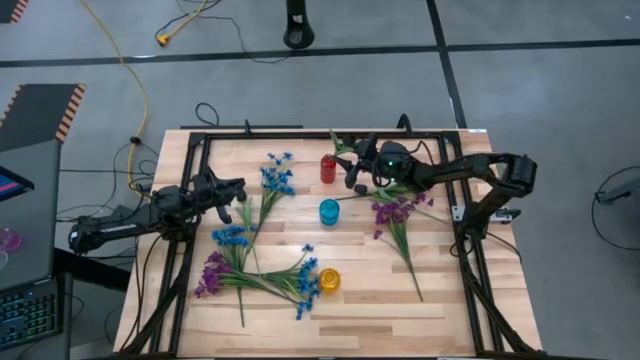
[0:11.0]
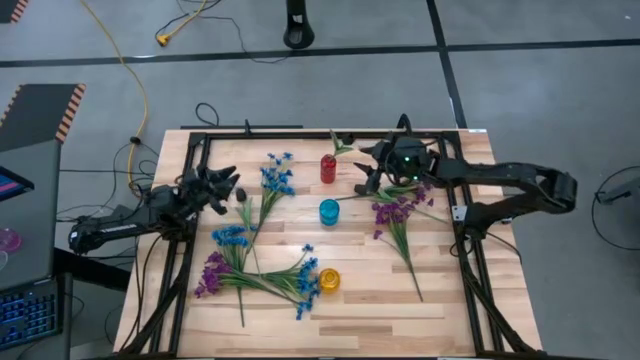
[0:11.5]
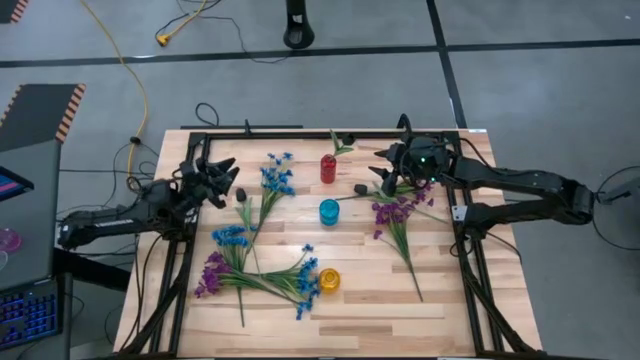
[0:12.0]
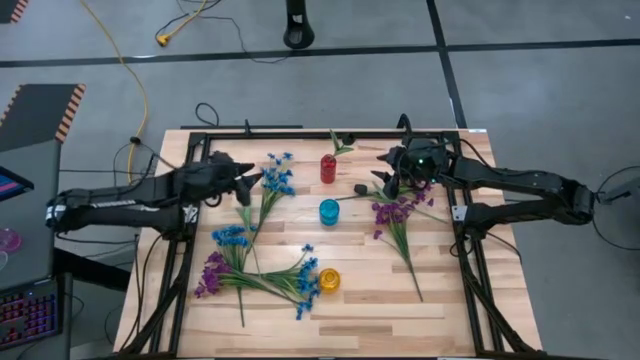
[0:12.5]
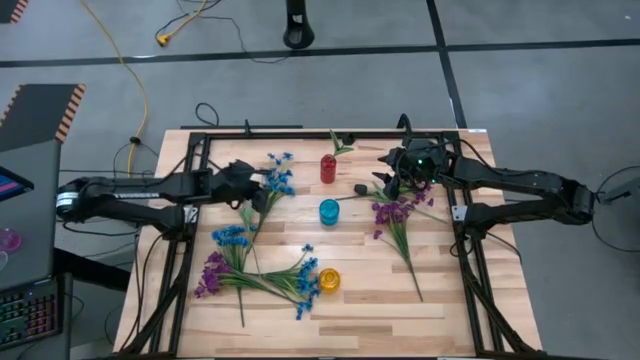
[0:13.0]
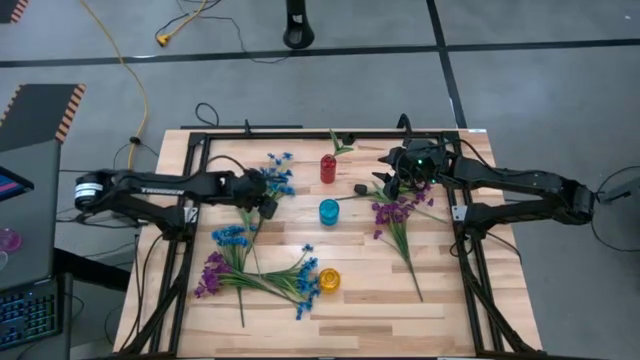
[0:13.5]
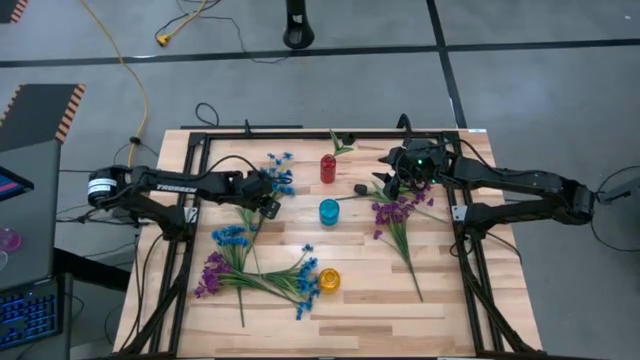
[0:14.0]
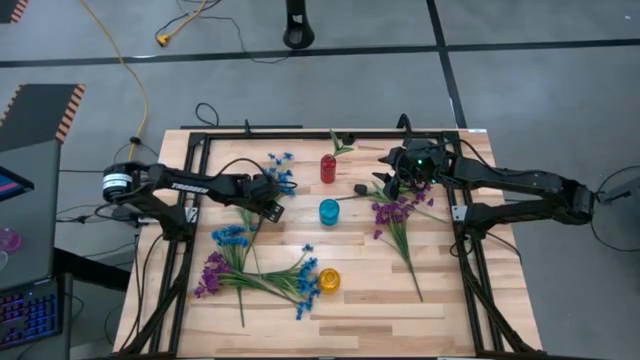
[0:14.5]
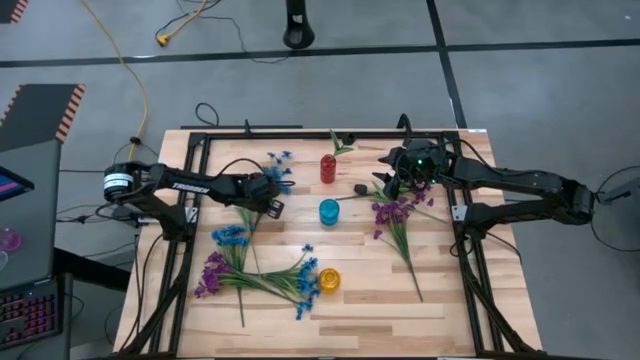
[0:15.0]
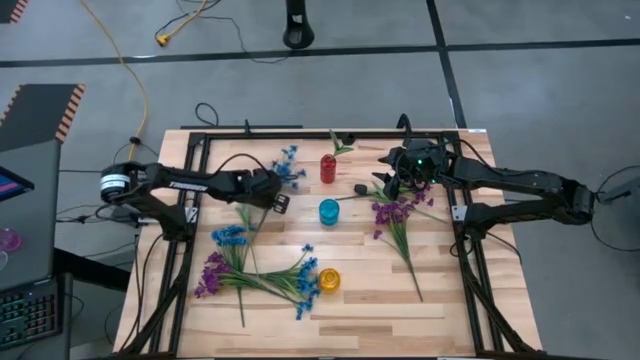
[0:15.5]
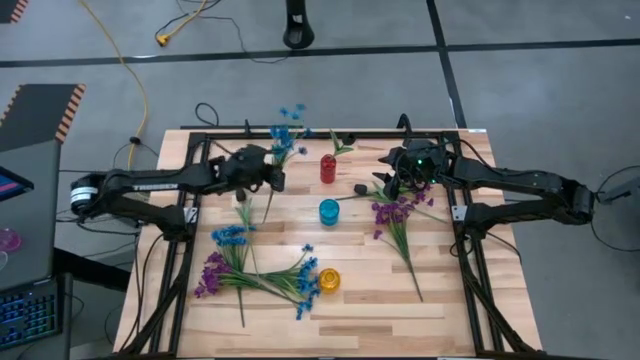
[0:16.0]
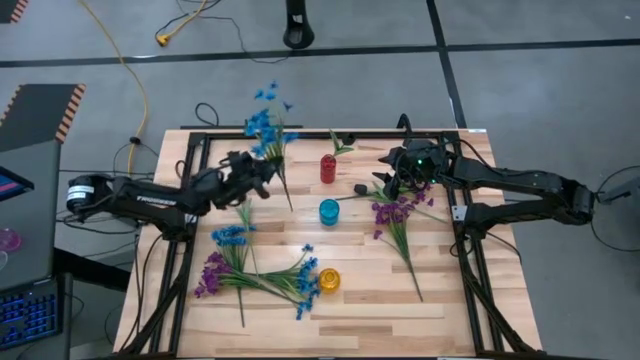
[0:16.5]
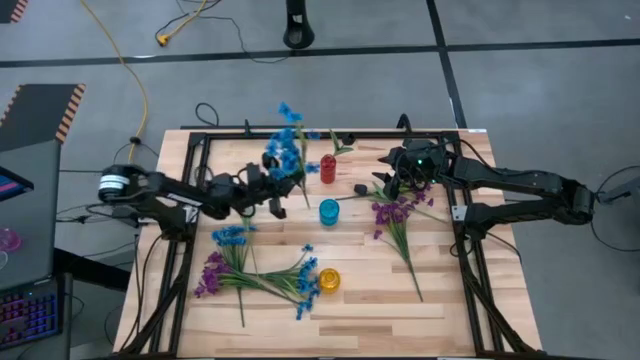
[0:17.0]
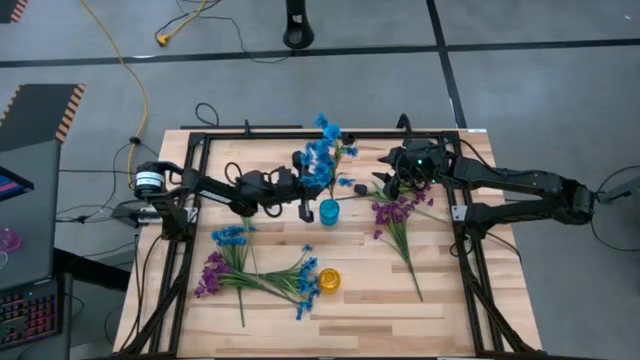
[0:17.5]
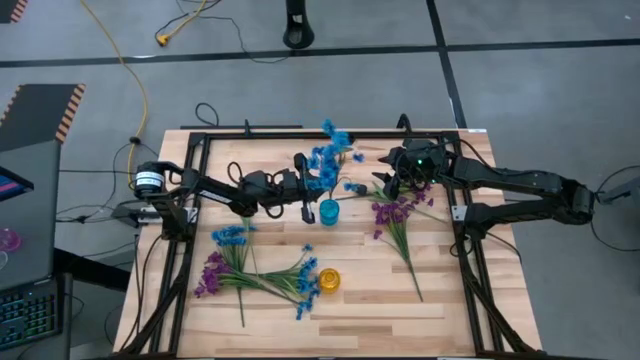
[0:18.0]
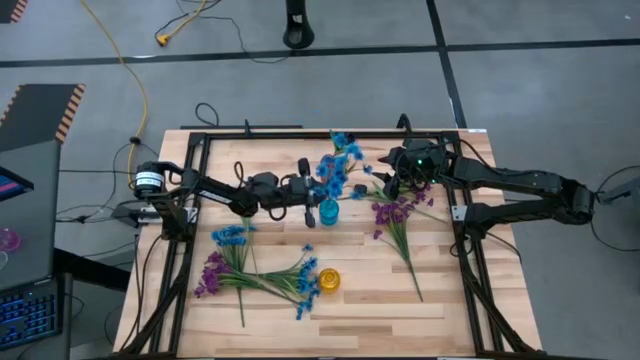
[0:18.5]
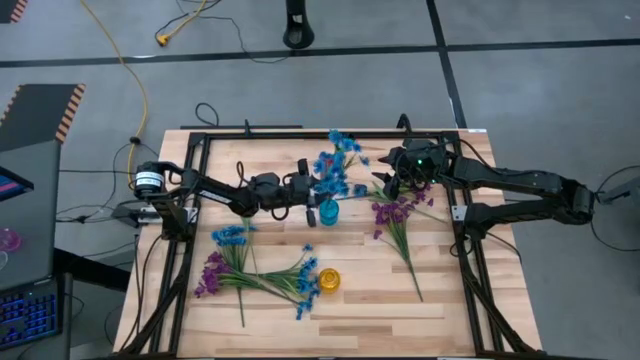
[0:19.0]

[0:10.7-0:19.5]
Task: Sort flowers into vase by color
Put the top middle blue flower into the blue crystal vase

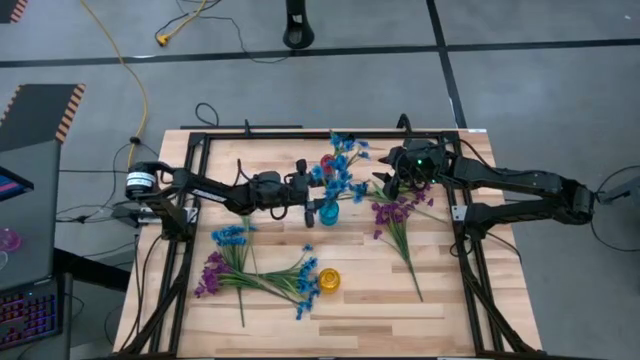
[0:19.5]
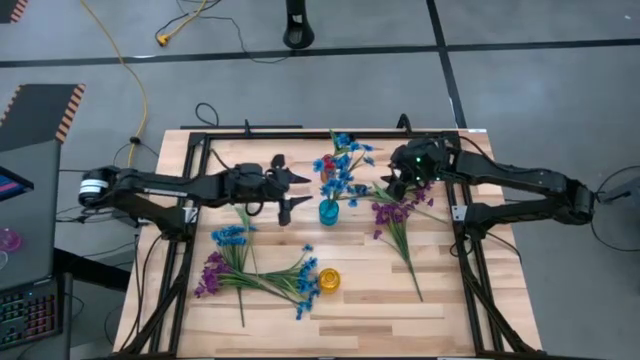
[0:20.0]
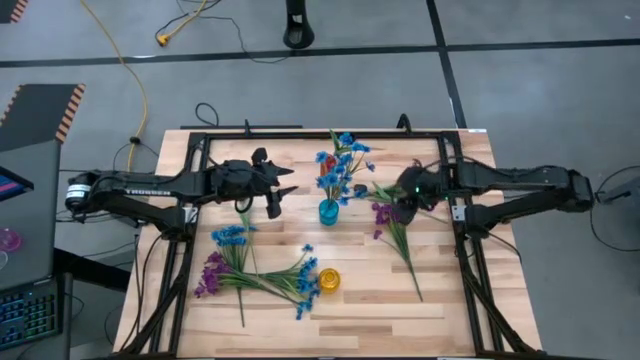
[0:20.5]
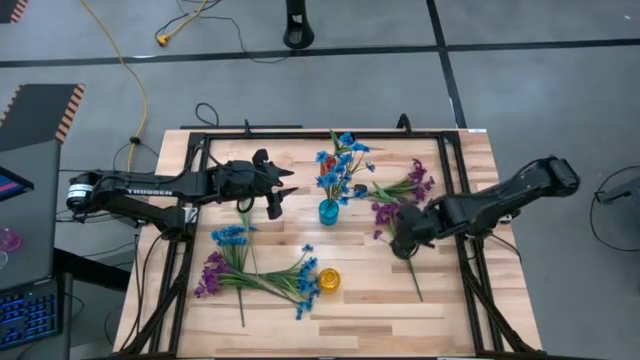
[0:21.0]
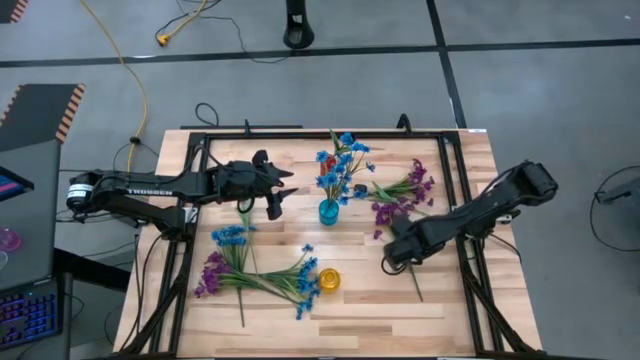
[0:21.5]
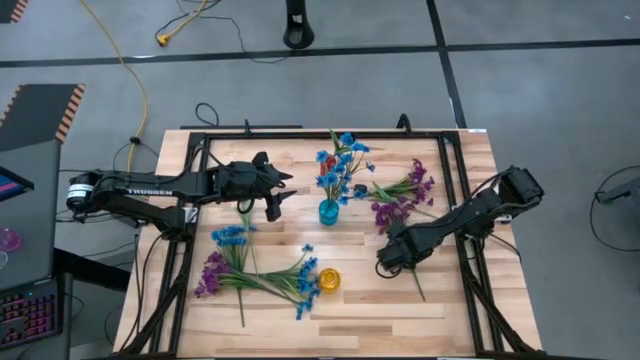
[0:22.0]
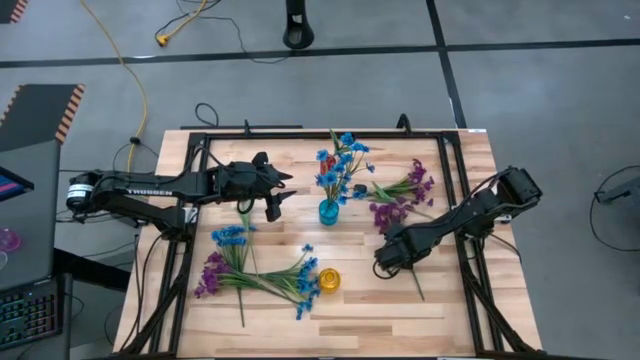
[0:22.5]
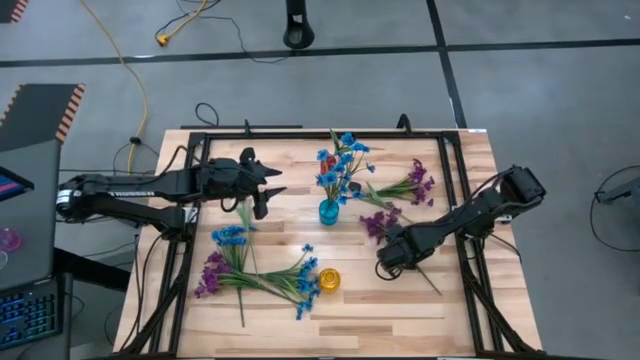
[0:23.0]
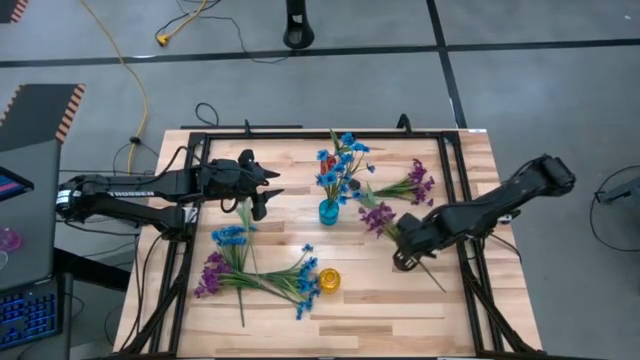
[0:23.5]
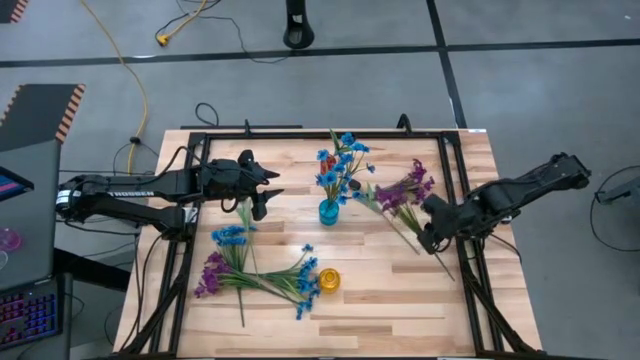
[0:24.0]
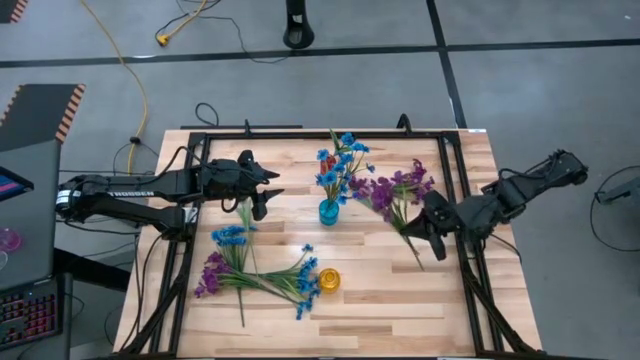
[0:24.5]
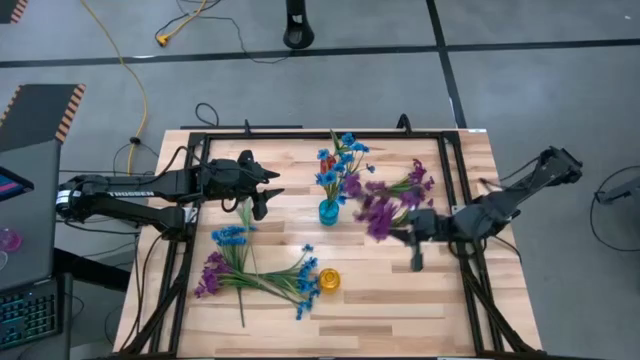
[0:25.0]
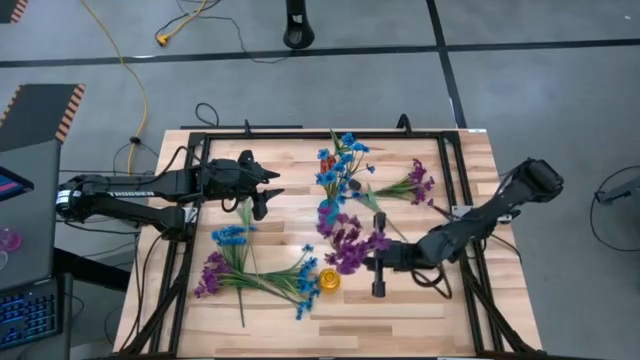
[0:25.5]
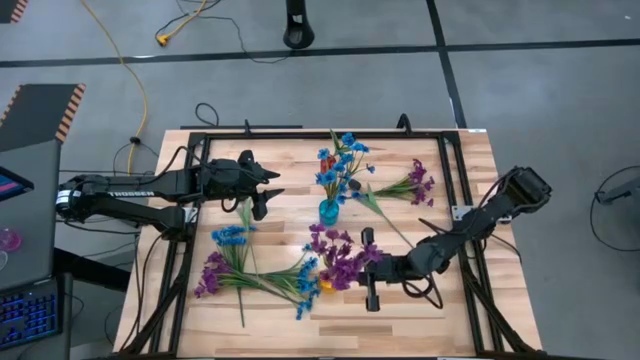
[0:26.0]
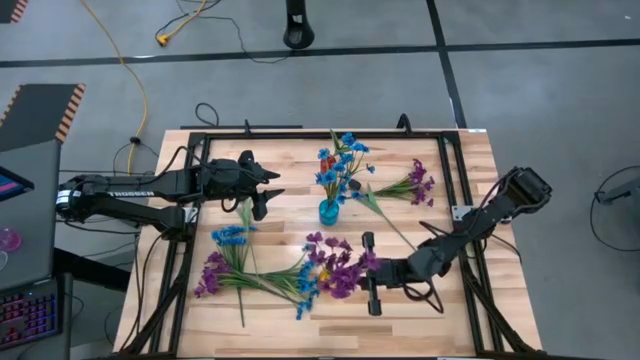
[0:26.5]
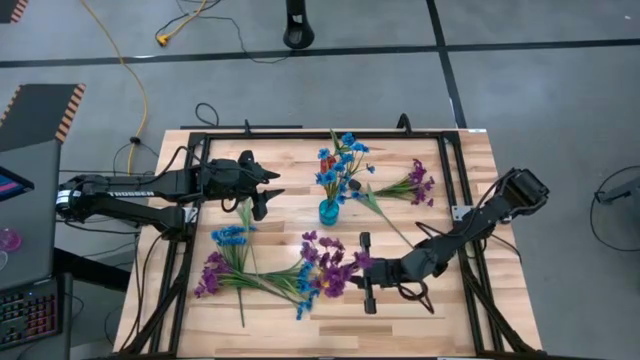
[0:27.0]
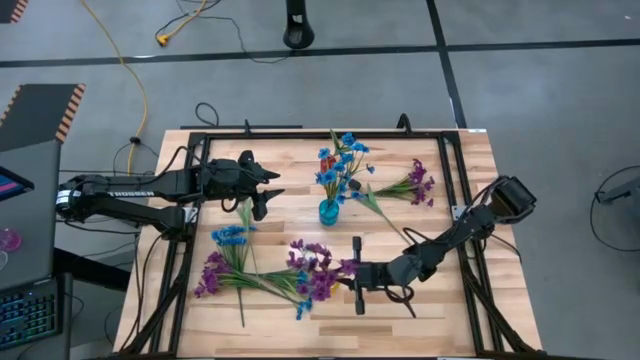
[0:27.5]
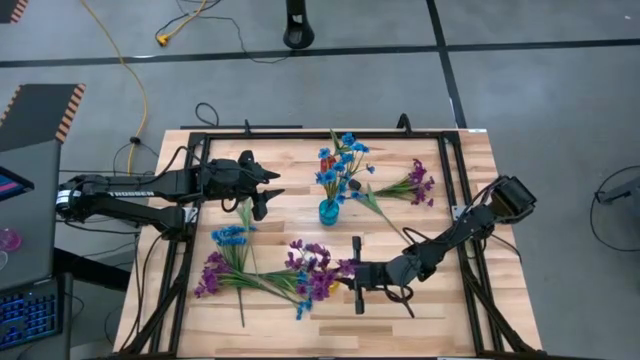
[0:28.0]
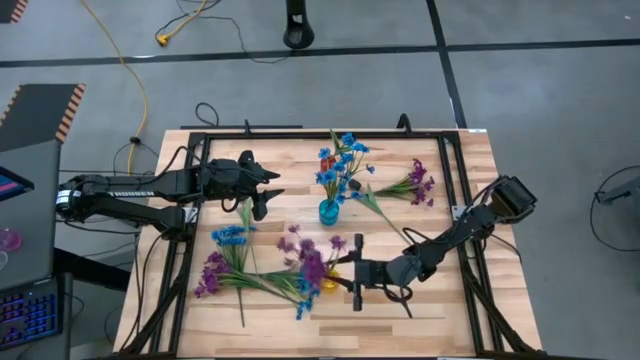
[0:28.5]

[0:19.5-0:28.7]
Put the middle right violet flower into the yellow crystal vase

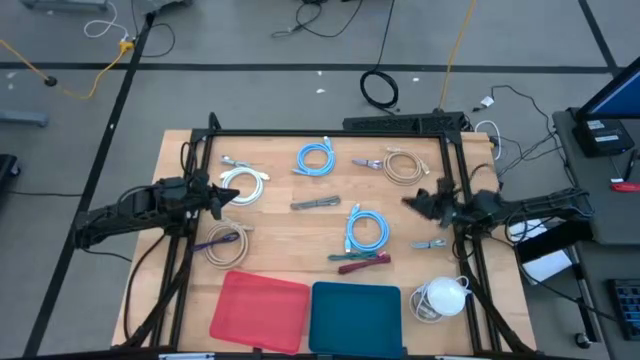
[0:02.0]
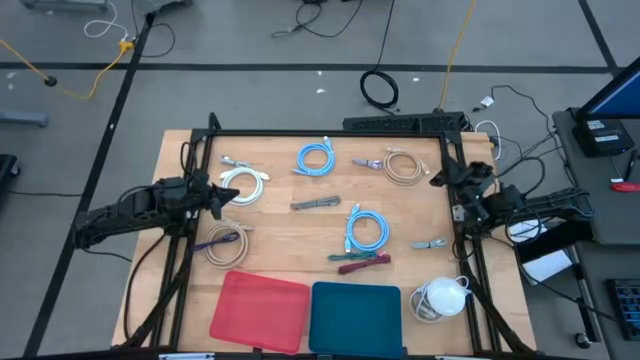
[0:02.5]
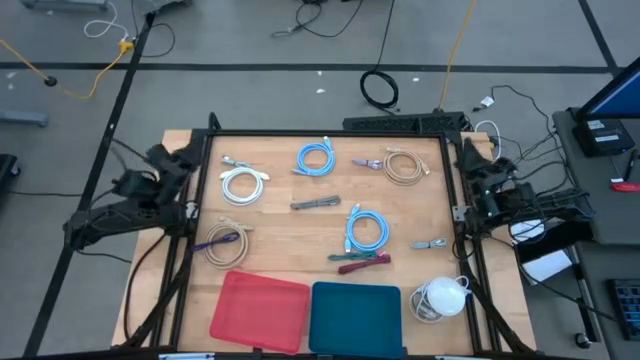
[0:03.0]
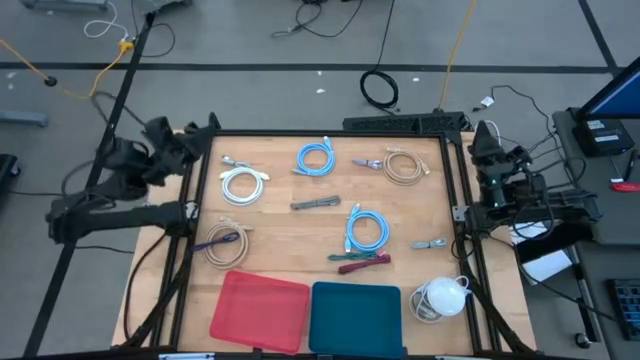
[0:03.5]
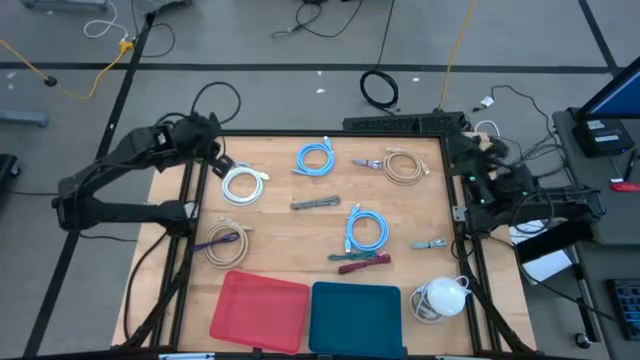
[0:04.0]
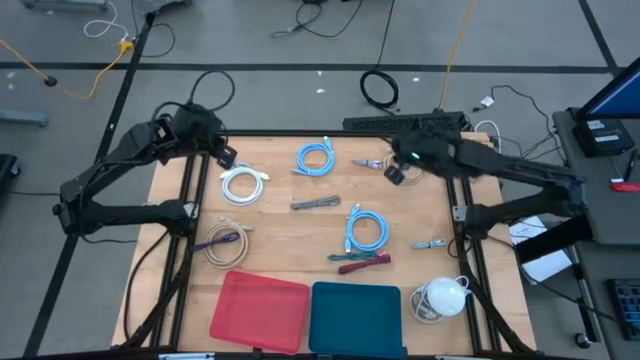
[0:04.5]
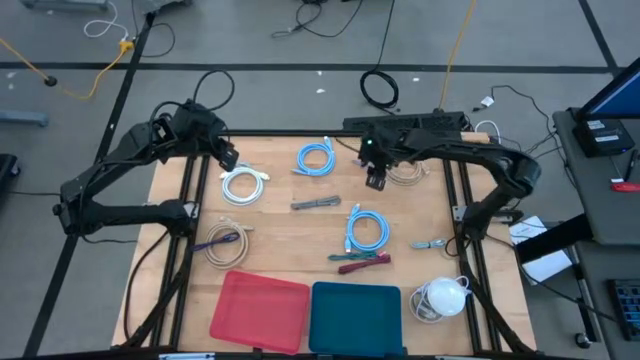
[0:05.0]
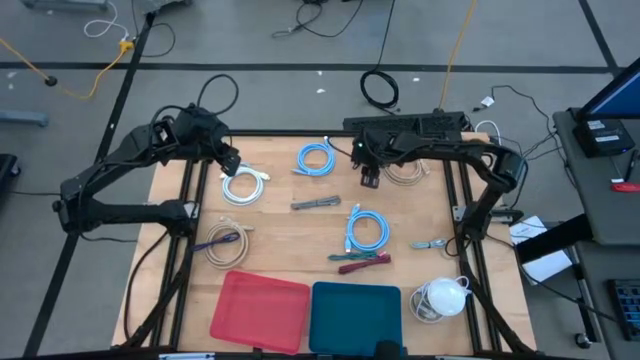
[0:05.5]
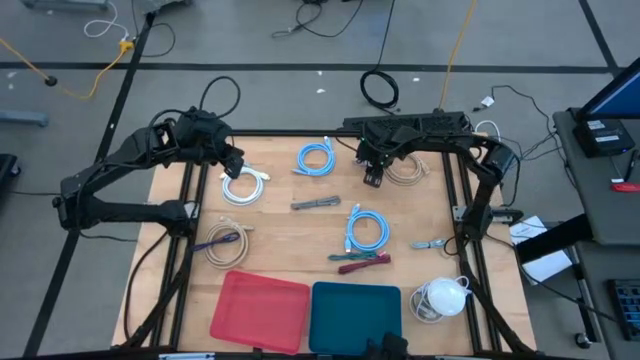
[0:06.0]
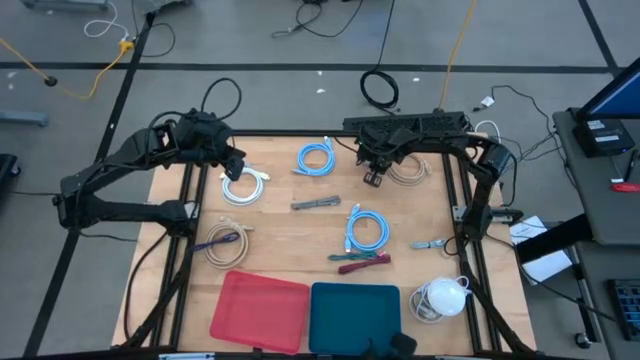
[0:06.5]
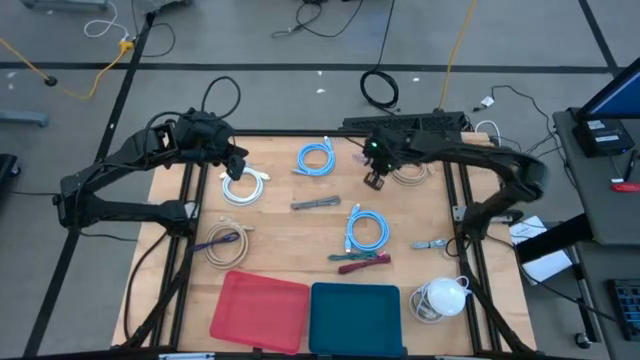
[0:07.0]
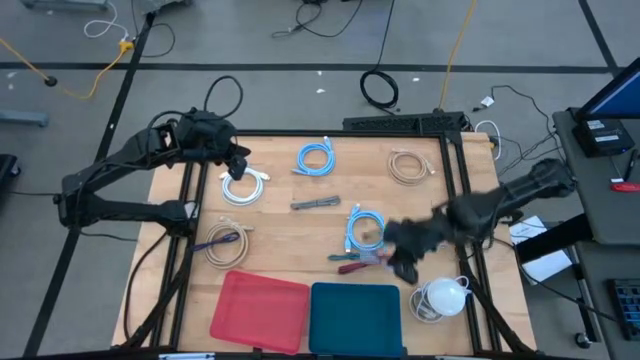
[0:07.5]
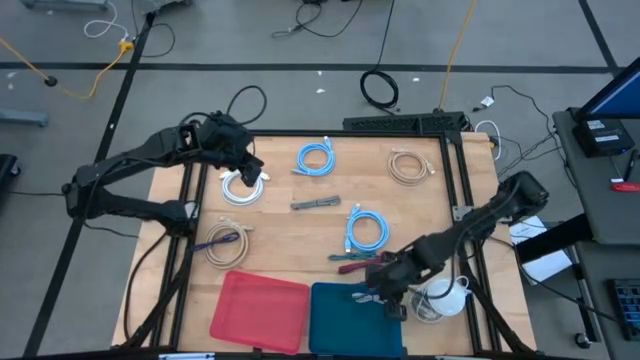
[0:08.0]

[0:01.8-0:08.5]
Task: Pick & Place USB Port
Put the top right white USB cable into the blue bin
